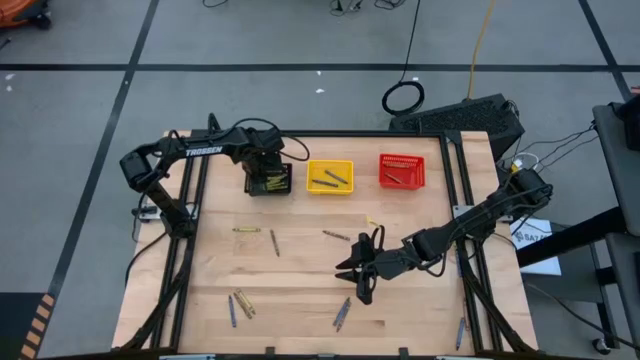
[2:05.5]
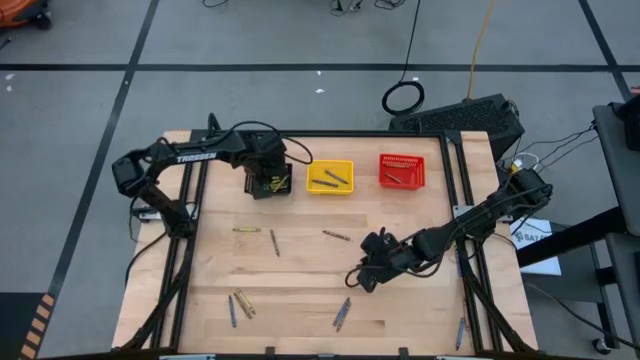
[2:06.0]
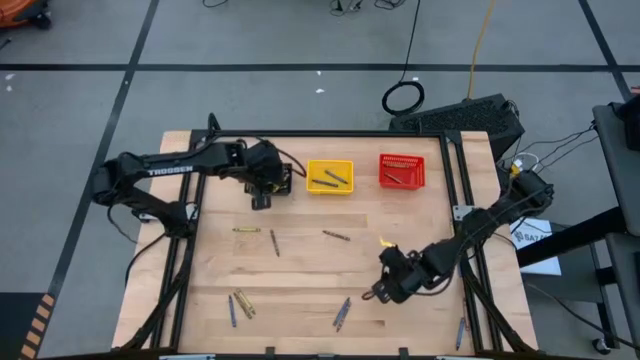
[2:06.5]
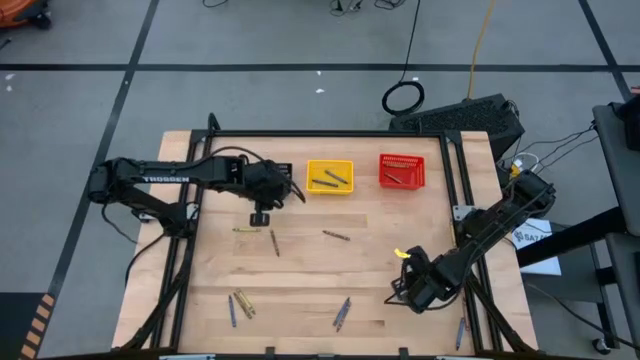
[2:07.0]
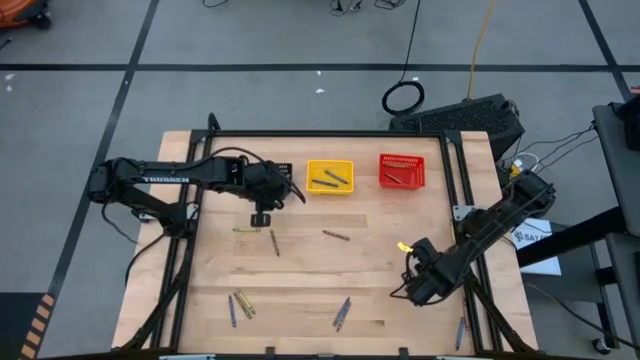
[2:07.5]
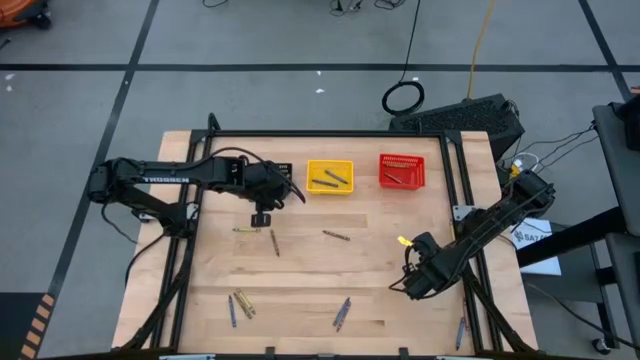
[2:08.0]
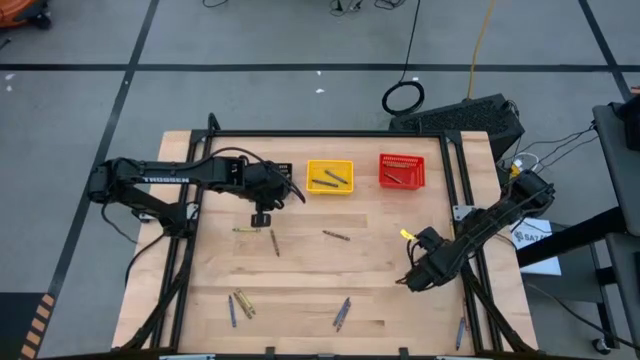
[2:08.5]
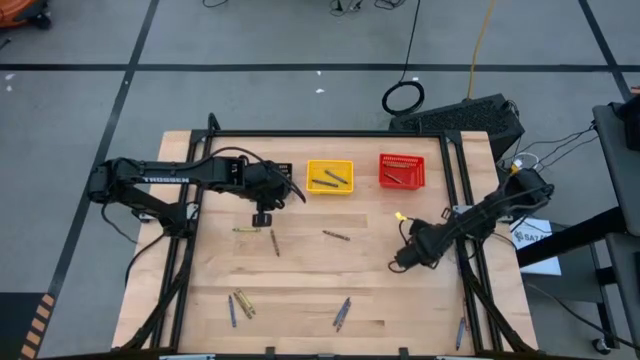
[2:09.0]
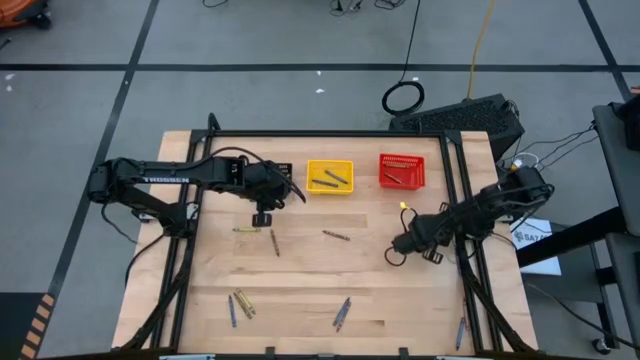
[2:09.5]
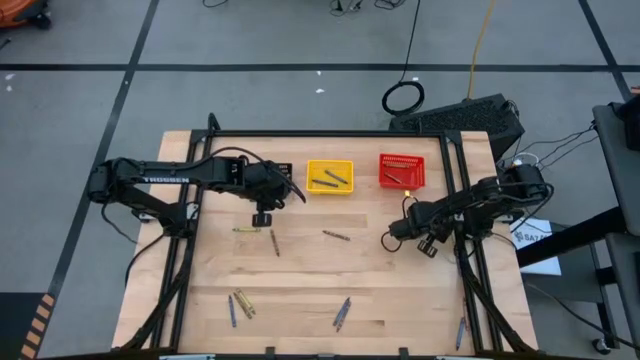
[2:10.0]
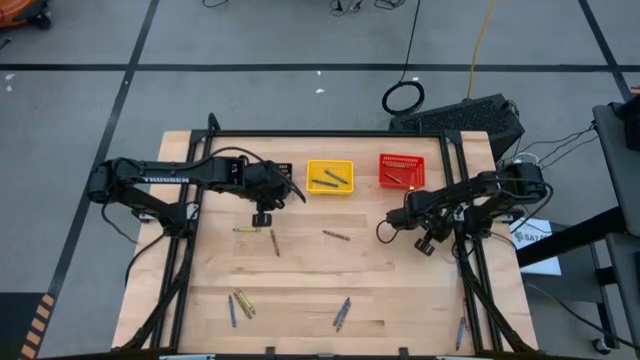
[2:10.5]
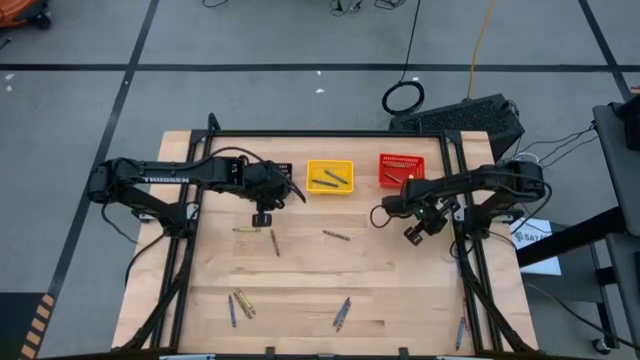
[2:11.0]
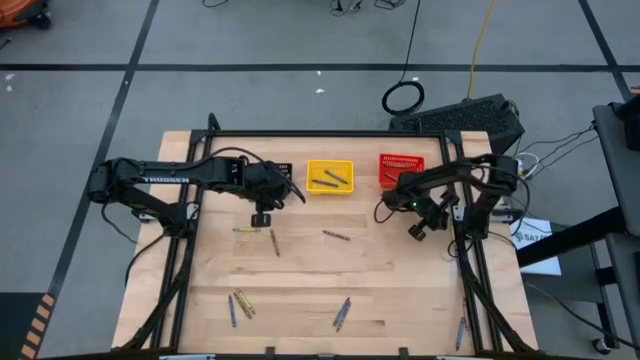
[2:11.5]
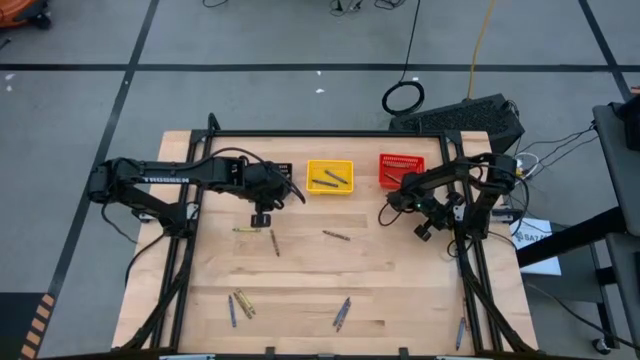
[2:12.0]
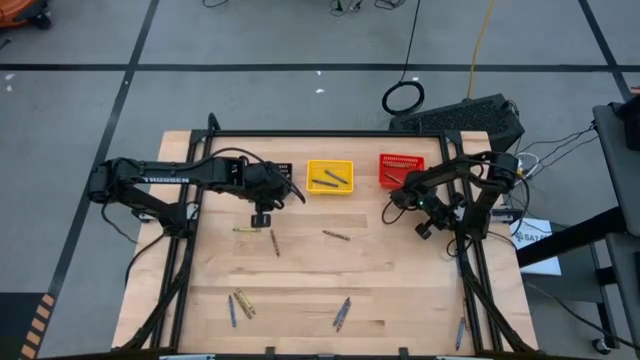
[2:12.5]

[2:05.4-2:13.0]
Task: Sort crayons
Put the green crayon into the black bin

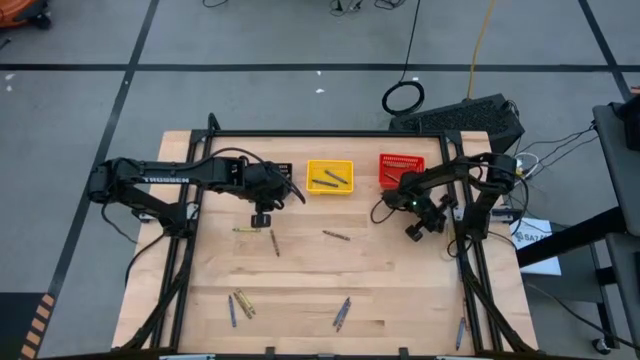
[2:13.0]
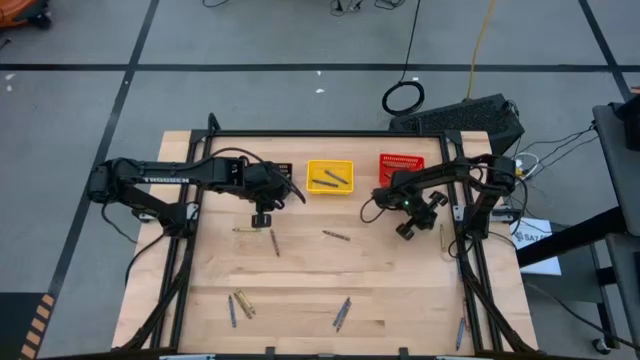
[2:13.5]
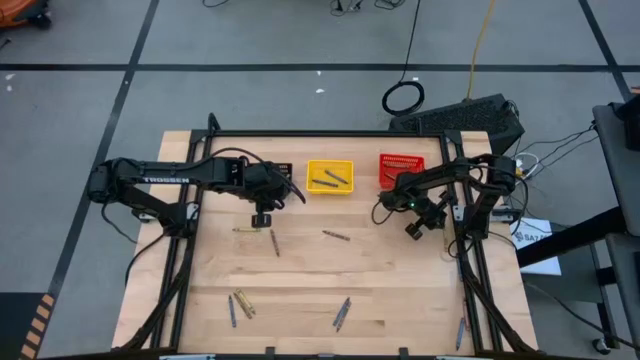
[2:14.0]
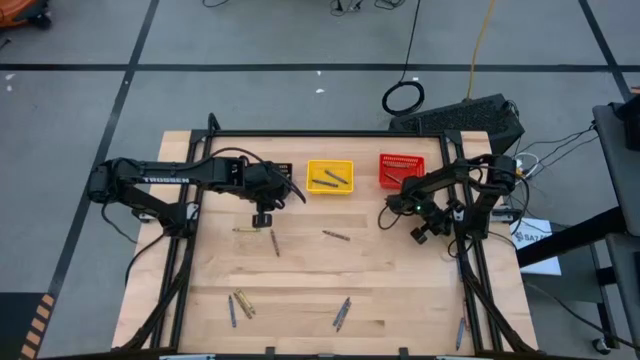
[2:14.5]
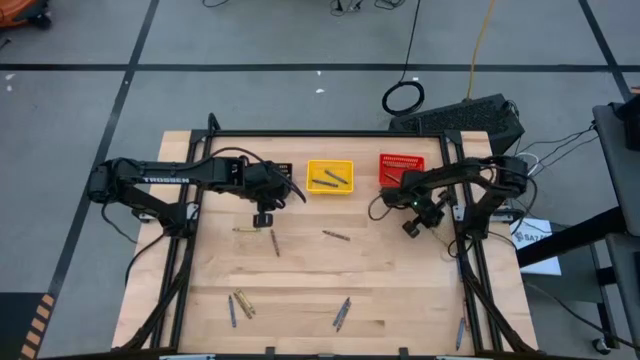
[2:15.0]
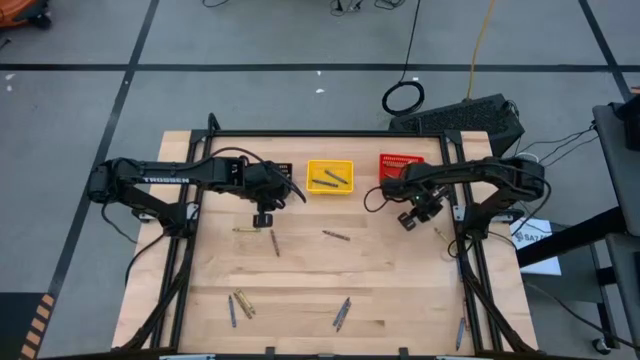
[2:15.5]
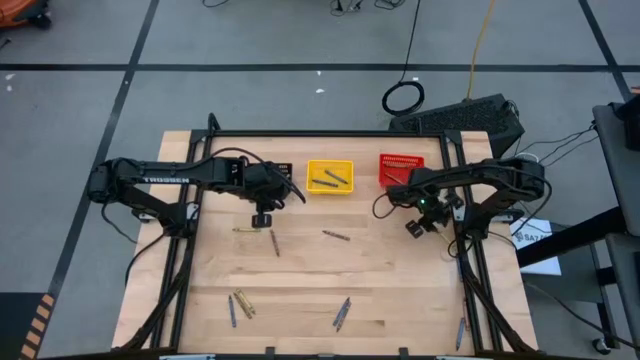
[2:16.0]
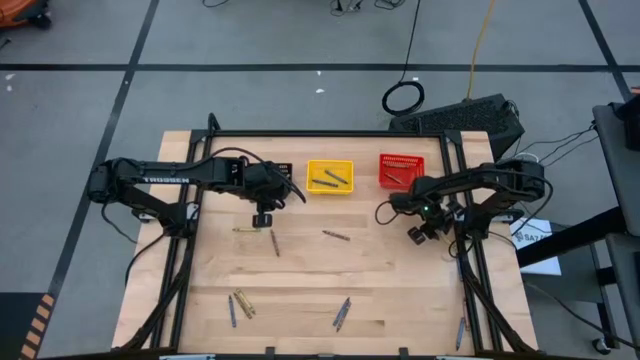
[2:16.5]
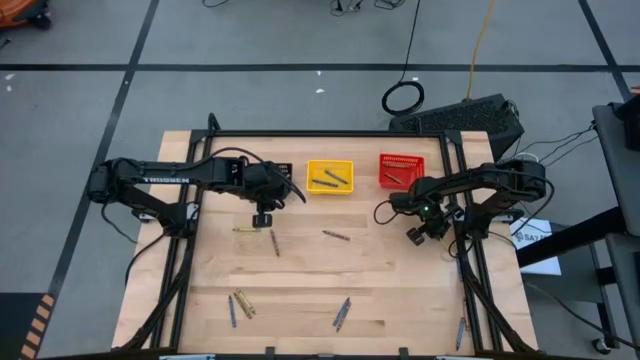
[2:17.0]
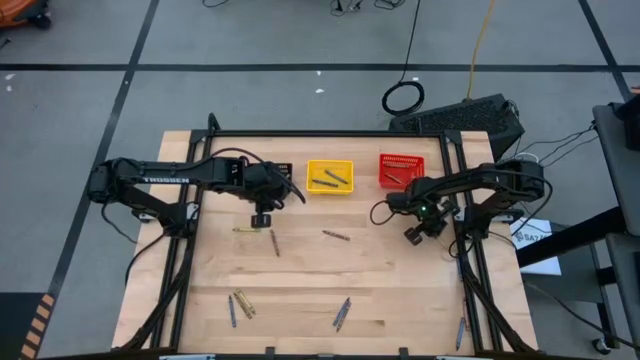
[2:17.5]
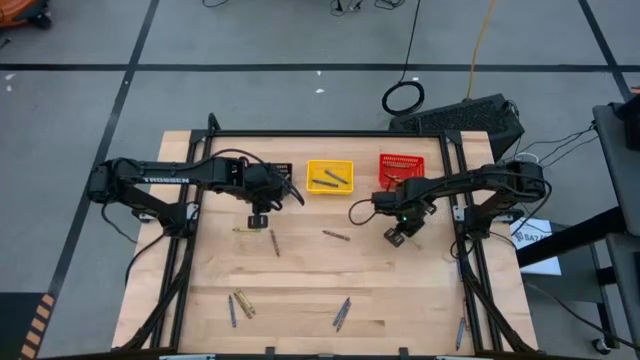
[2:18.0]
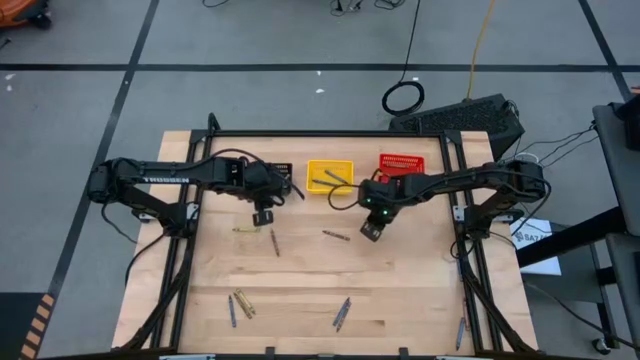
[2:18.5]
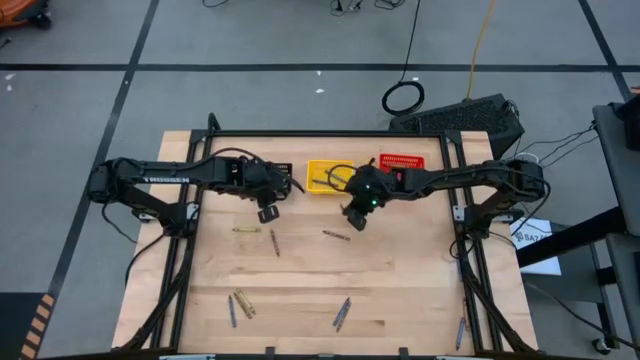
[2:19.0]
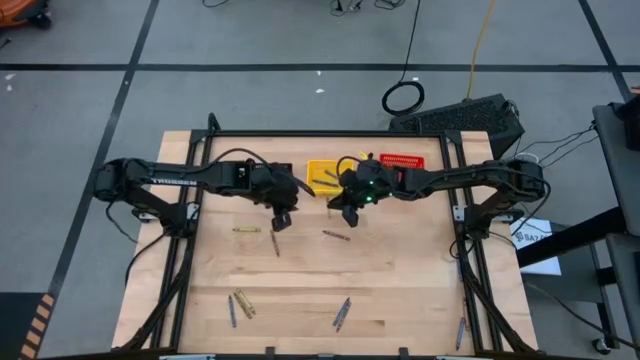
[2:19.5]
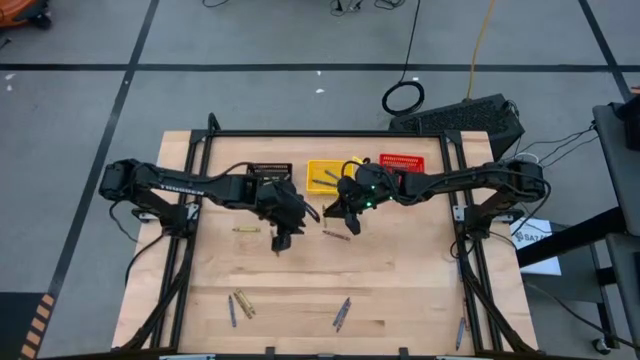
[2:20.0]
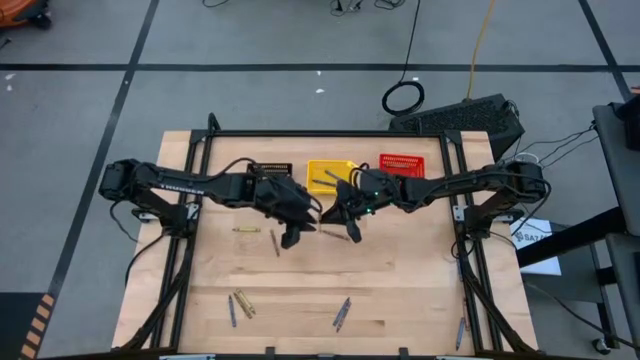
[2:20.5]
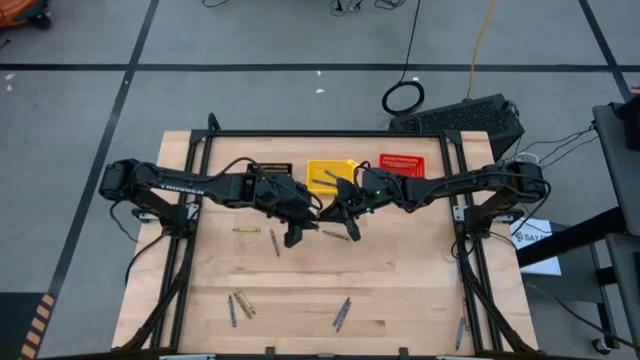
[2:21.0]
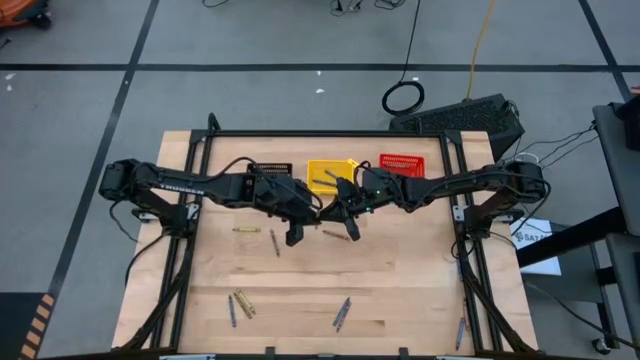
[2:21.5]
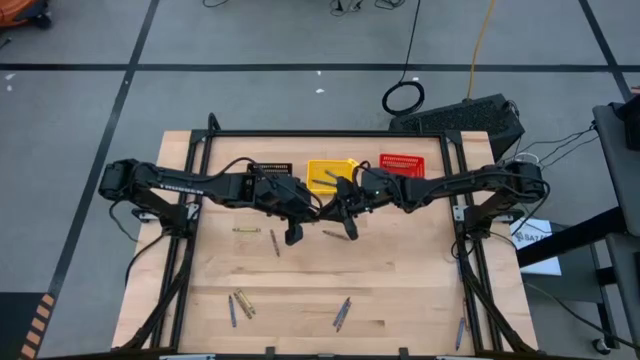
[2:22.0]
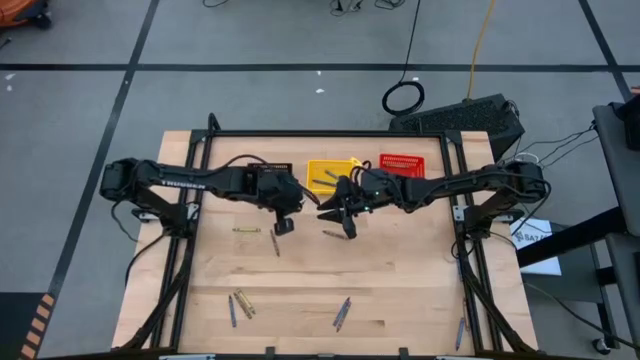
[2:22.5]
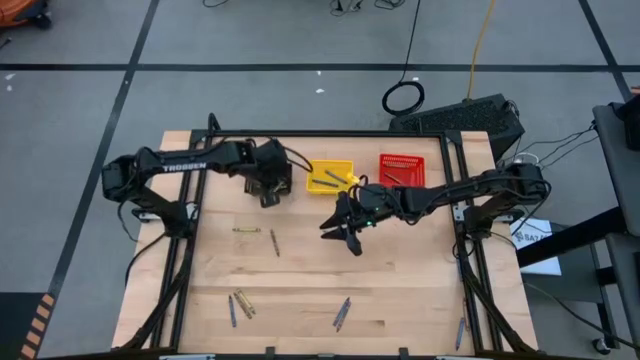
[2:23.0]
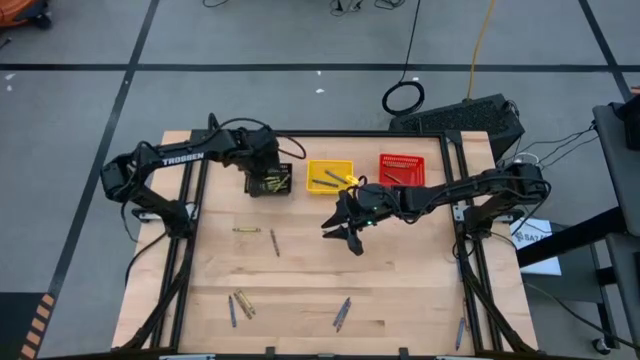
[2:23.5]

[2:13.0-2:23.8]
Put the green crayon into the black bin

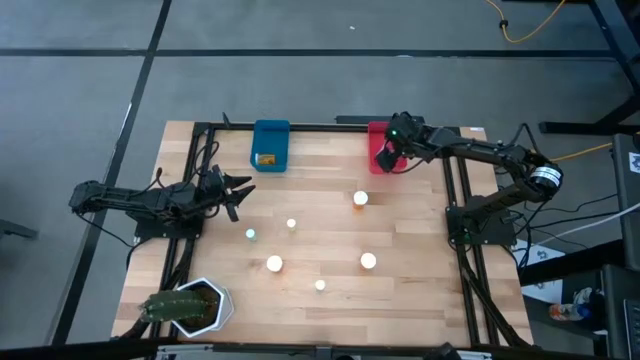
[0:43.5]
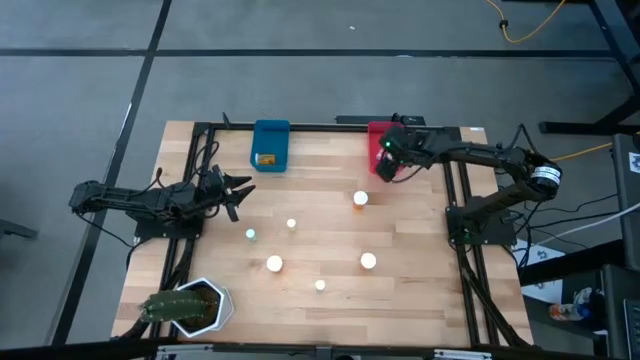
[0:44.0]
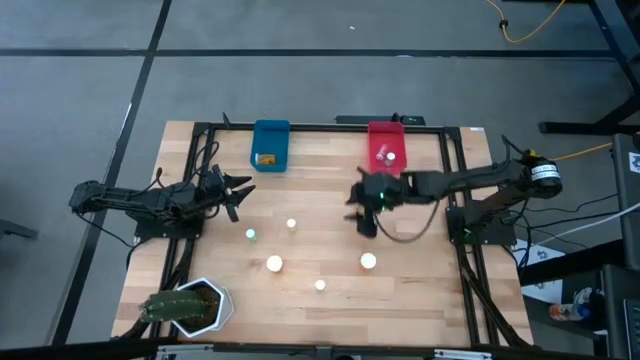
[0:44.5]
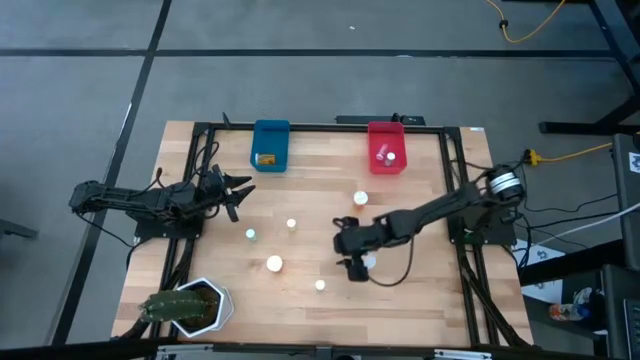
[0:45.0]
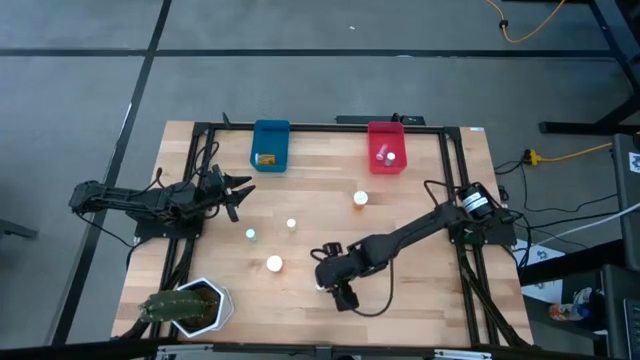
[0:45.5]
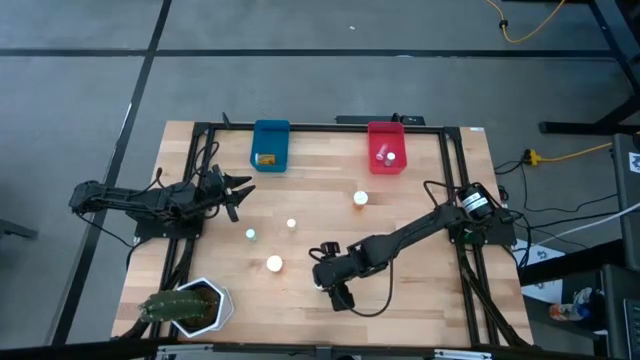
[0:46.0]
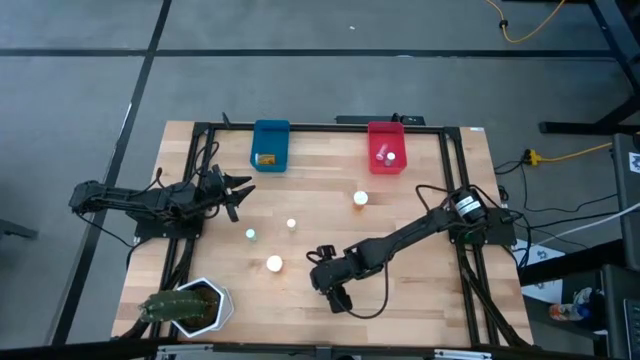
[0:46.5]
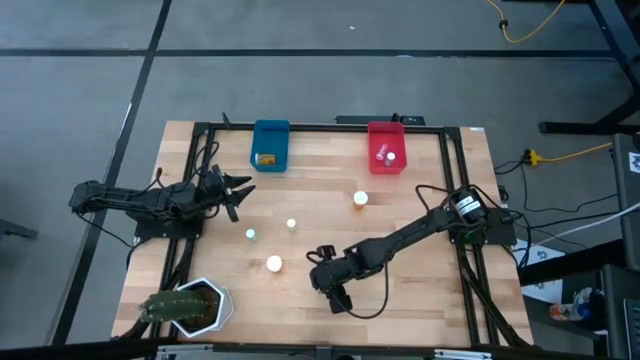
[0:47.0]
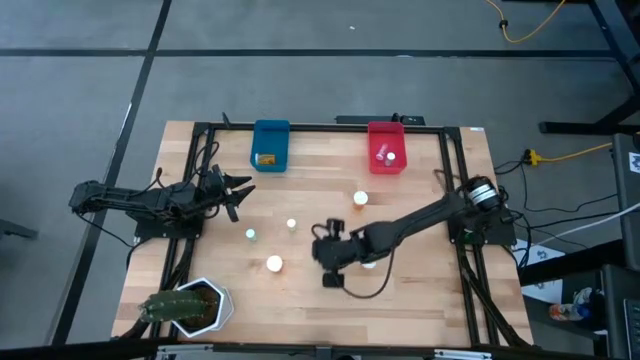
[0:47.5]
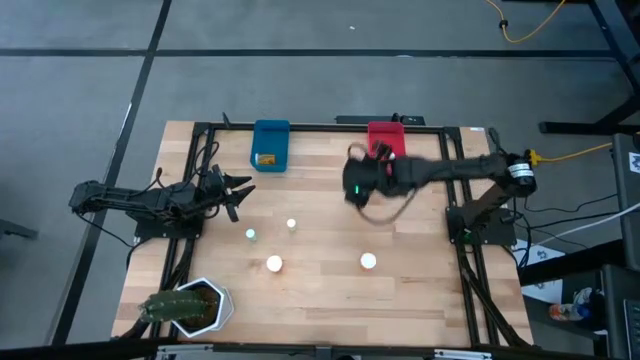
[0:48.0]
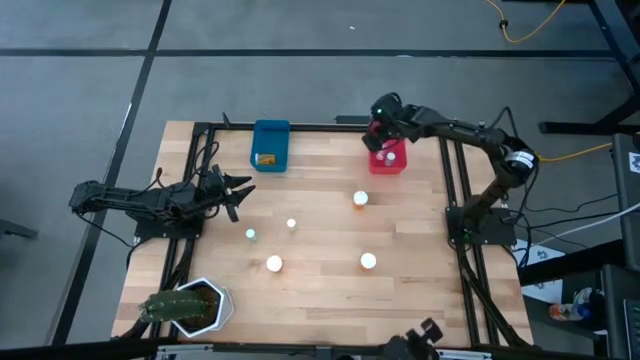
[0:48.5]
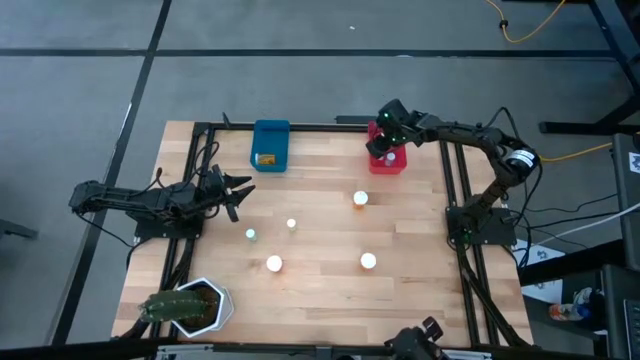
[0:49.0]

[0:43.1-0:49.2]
Task: Pick and place medicine bottles into bin by pill shape (circle, oval)
Put the small yellow pill bottle into the red bin
